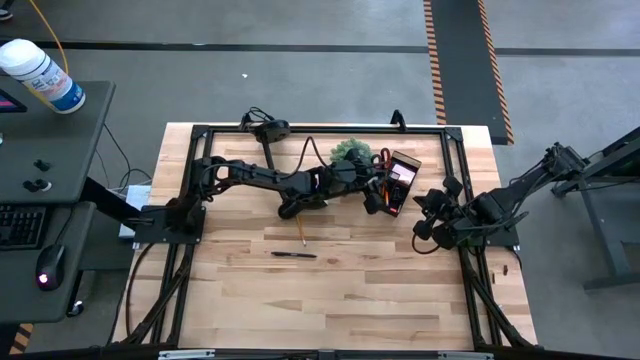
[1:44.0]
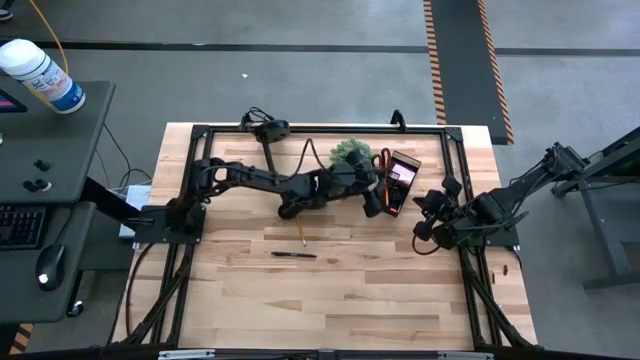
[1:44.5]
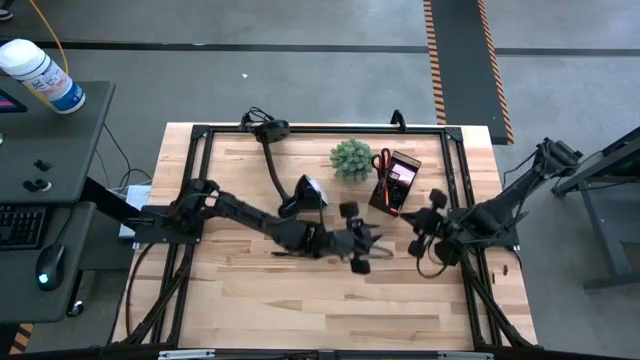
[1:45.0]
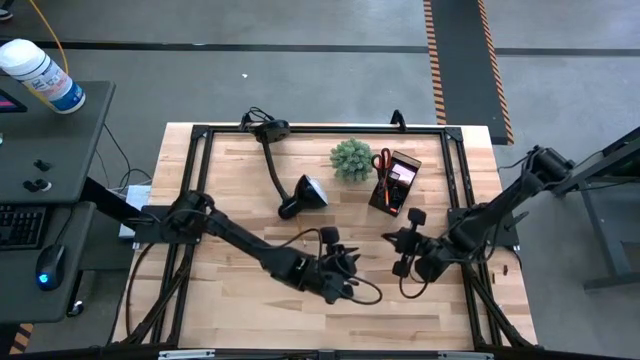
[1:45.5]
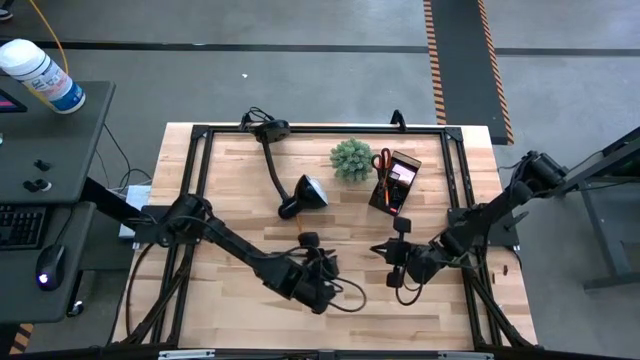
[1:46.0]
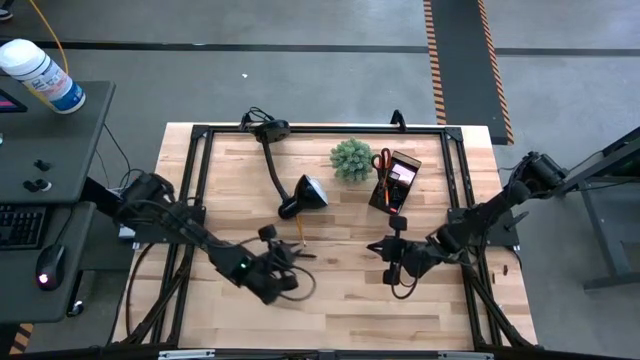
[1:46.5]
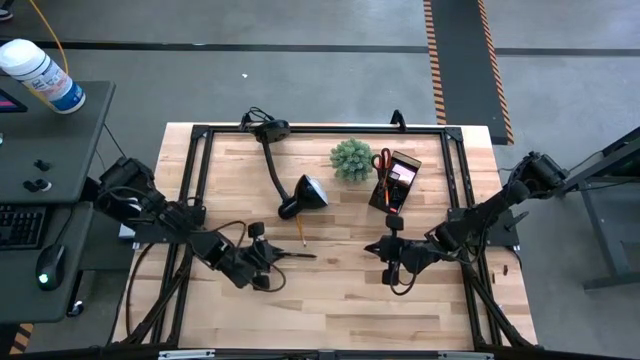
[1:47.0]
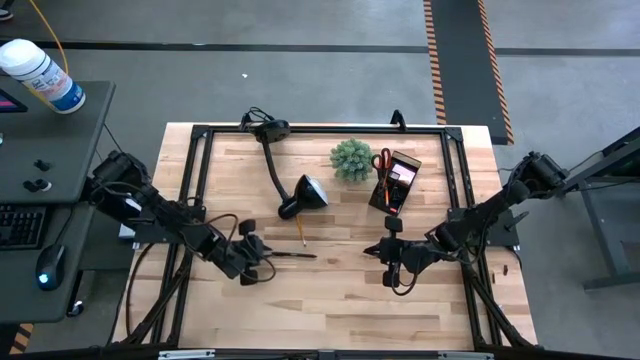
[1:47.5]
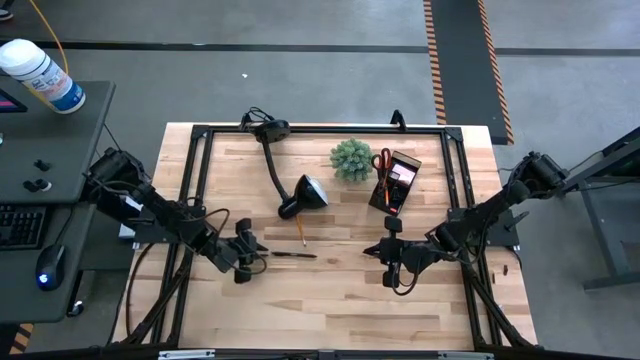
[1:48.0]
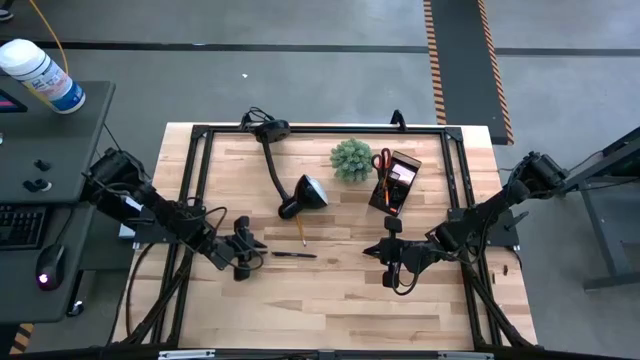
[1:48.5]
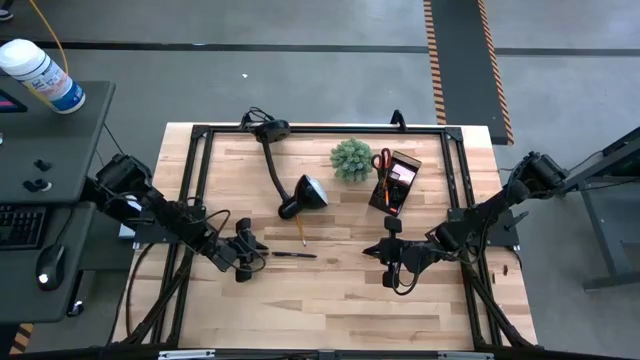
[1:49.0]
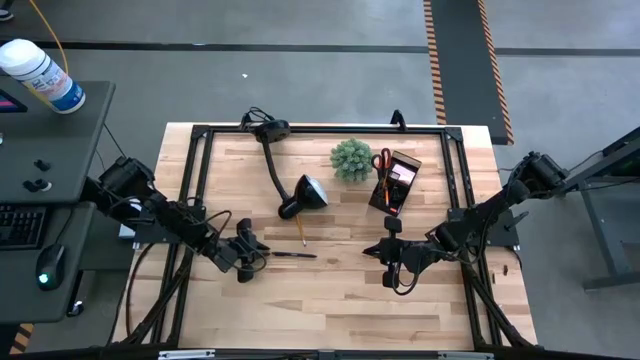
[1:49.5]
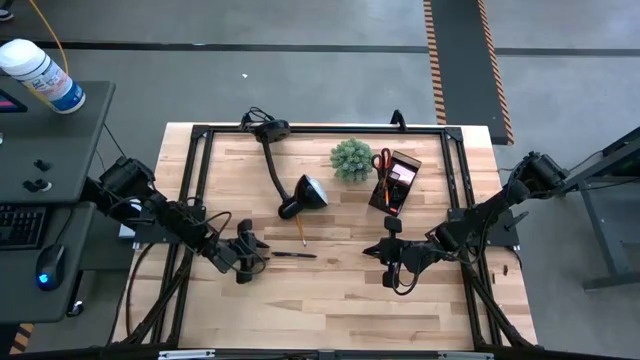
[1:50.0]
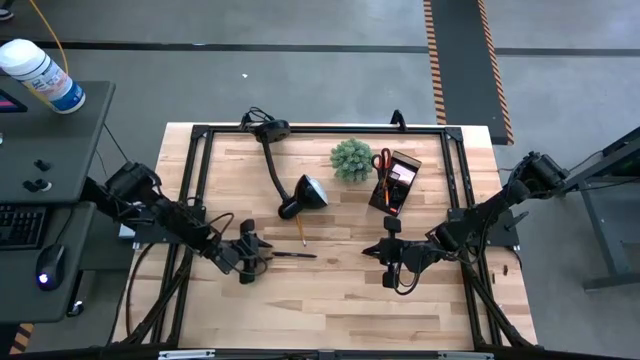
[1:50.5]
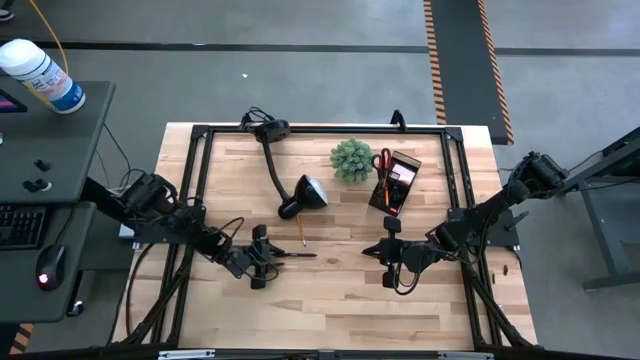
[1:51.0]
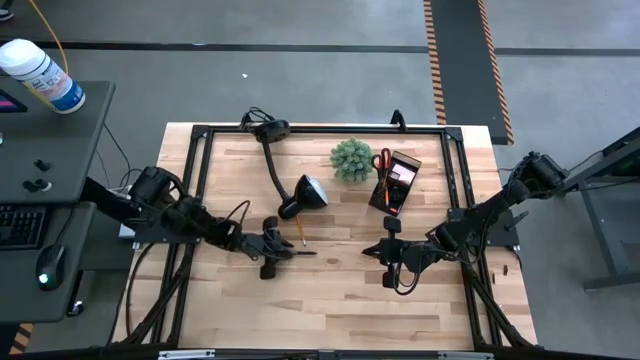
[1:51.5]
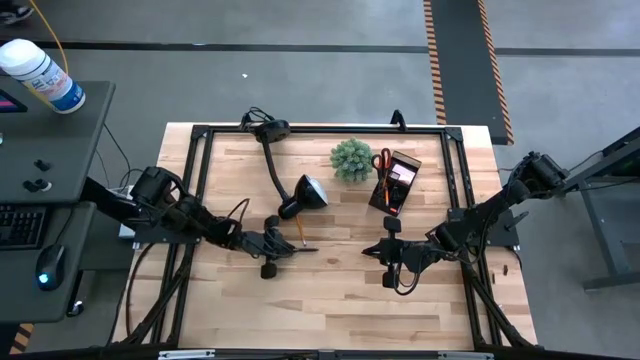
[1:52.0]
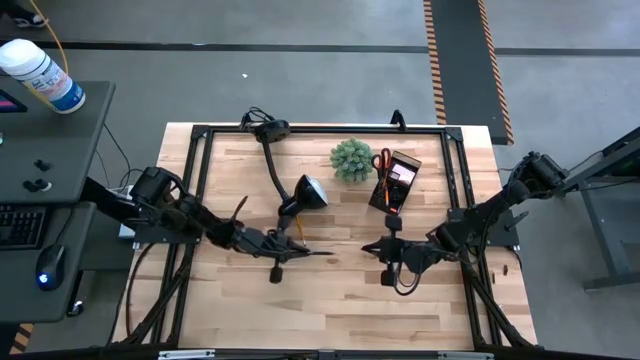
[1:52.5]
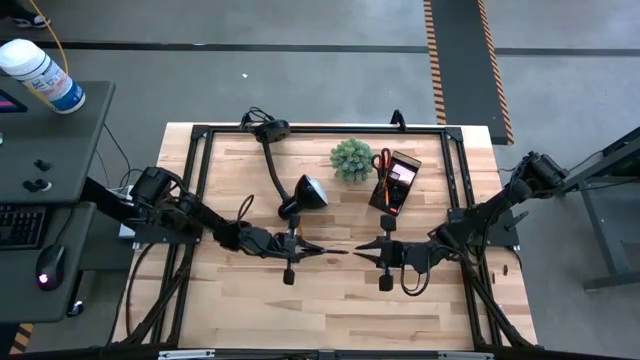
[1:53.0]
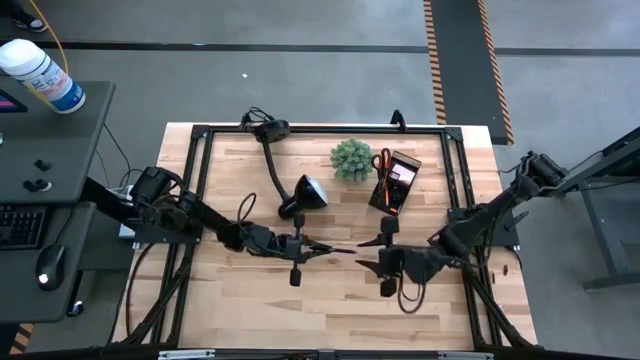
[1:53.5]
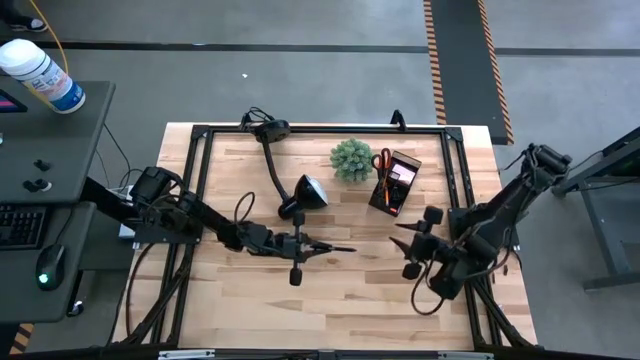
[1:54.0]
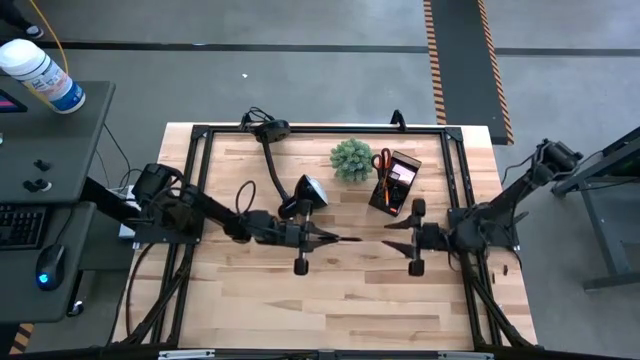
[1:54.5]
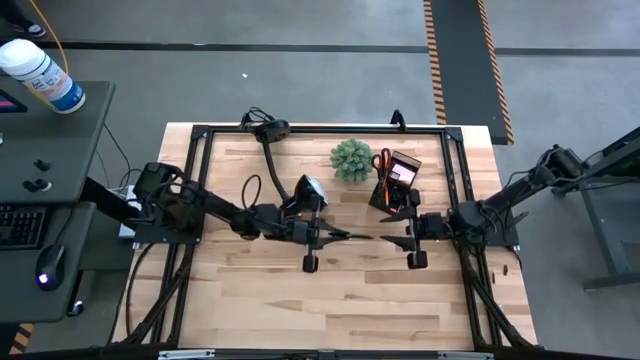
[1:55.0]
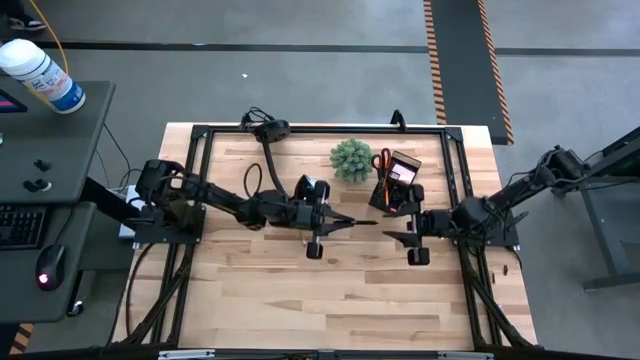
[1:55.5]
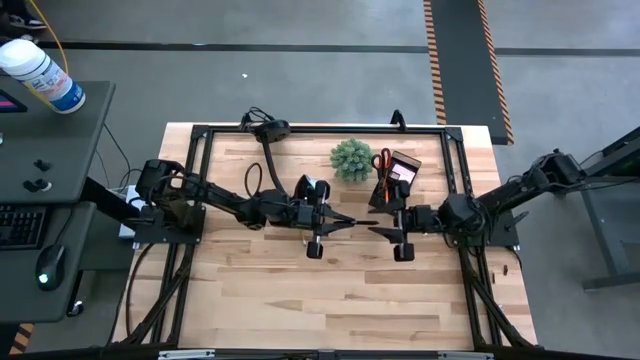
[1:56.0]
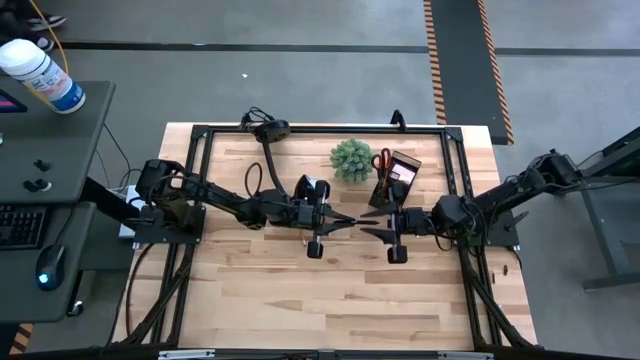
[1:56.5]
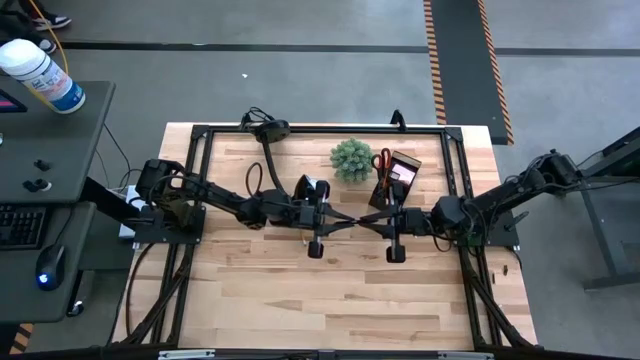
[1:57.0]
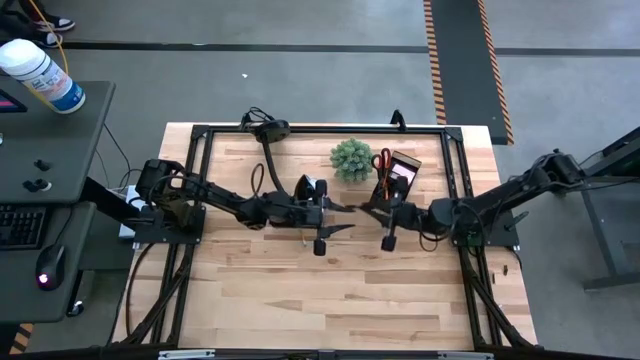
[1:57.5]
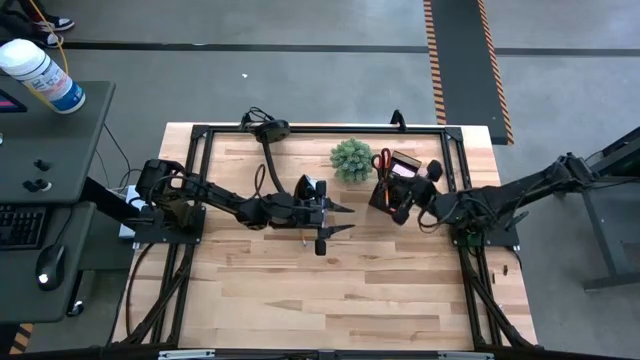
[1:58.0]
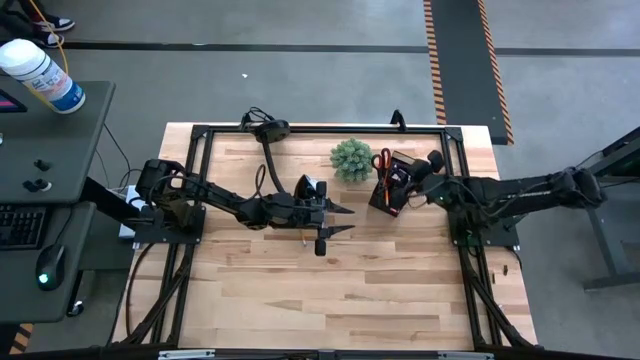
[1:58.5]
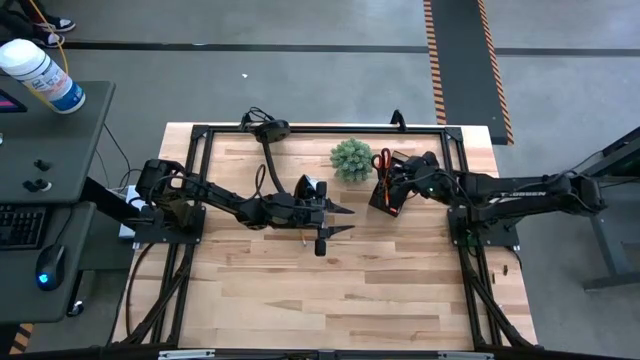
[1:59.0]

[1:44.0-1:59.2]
Task: Pick and place office supplies into organizer
Put the black pen into the desk organizer

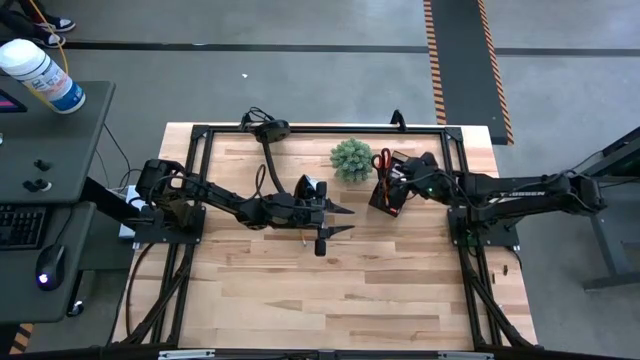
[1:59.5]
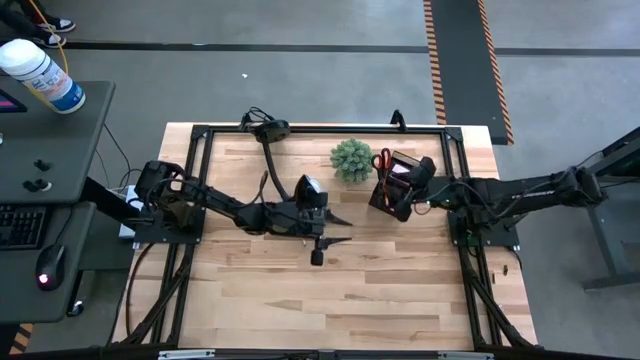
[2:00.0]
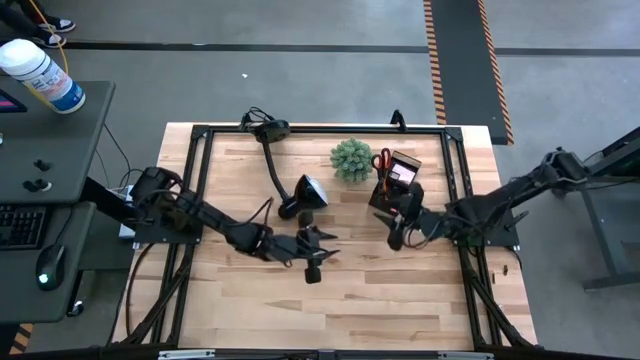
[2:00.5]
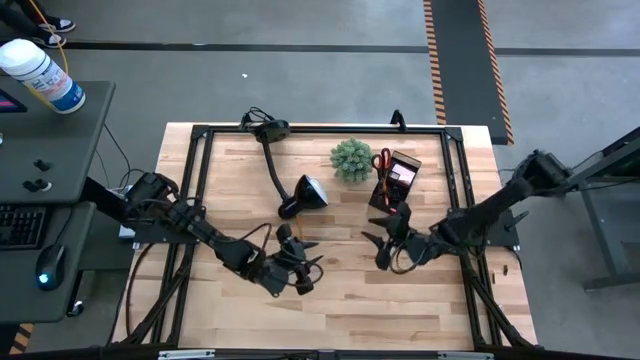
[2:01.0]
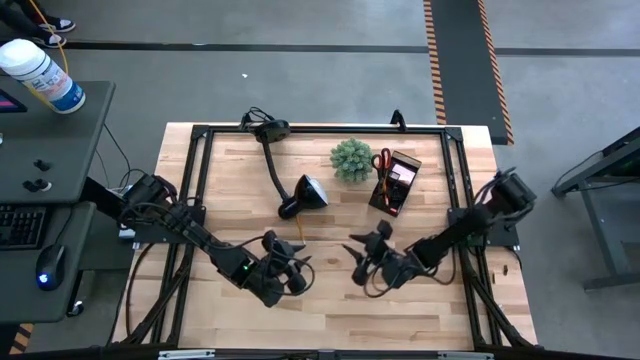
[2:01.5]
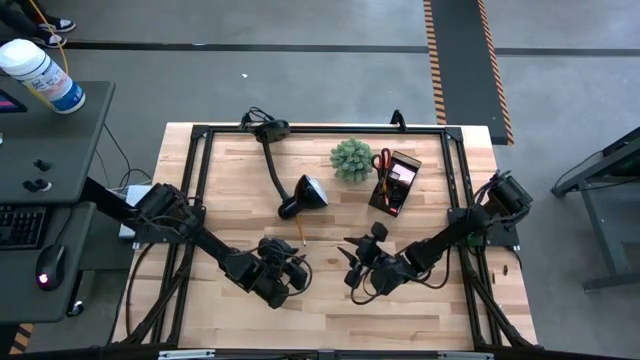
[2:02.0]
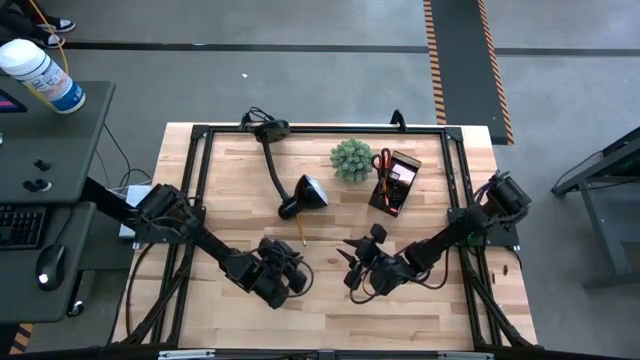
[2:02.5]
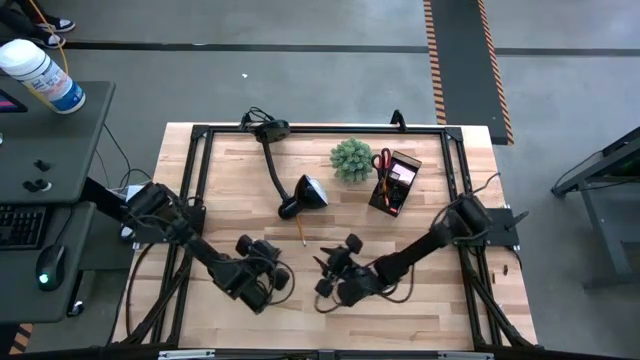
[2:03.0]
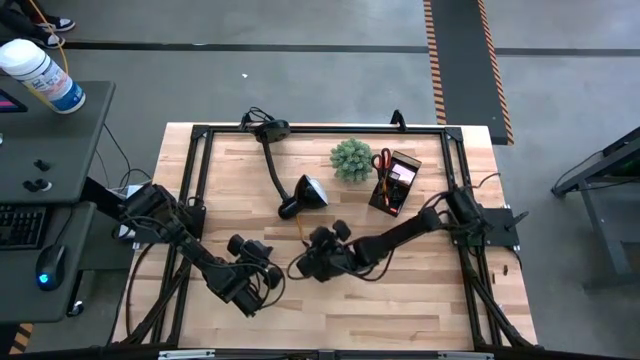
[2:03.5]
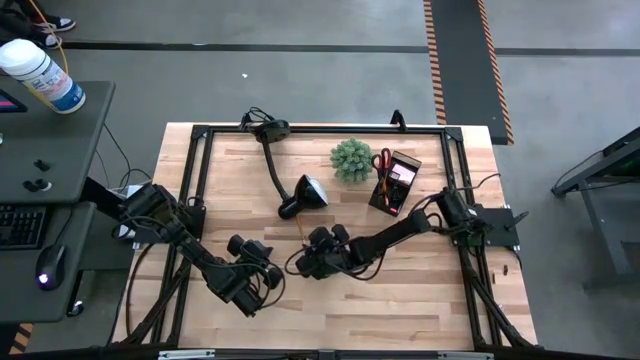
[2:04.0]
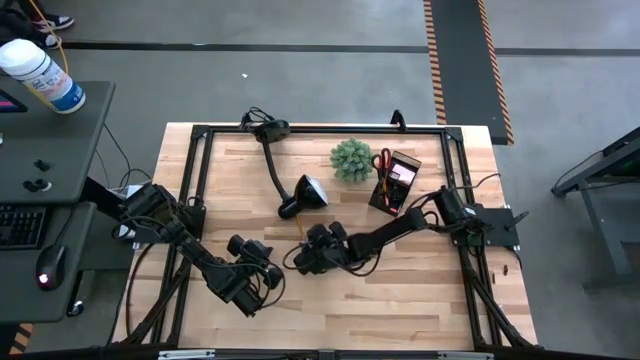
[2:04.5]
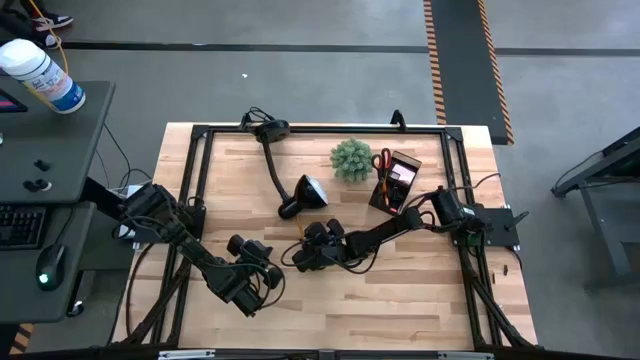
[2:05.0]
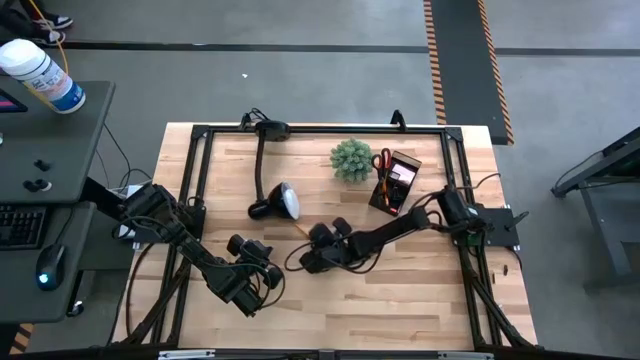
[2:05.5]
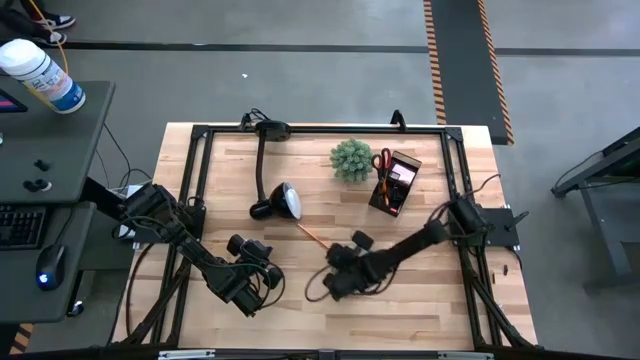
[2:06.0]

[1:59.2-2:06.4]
Put the orange pencil into the desk organizer
